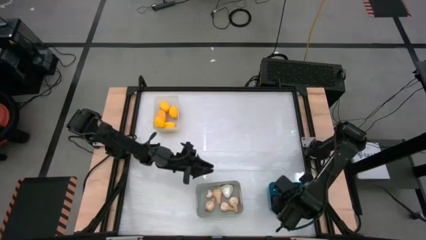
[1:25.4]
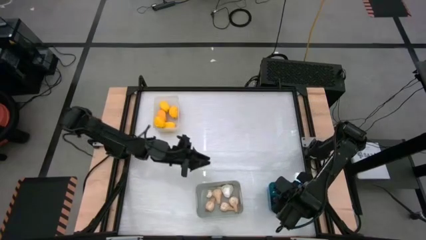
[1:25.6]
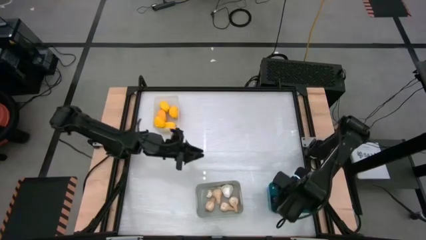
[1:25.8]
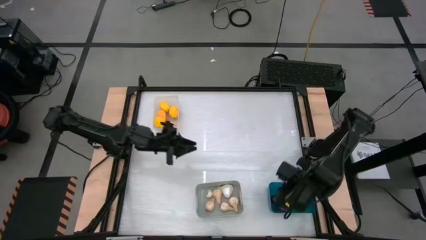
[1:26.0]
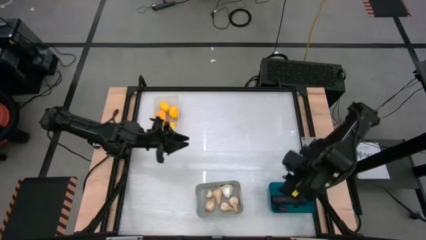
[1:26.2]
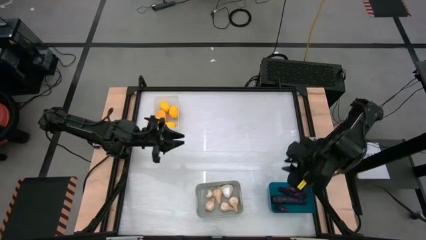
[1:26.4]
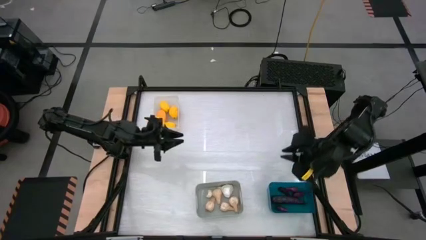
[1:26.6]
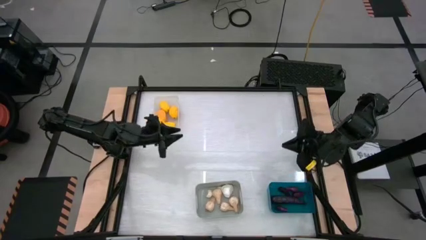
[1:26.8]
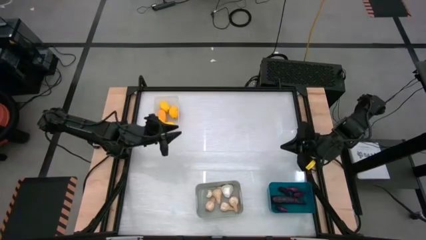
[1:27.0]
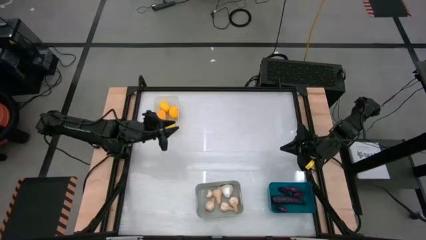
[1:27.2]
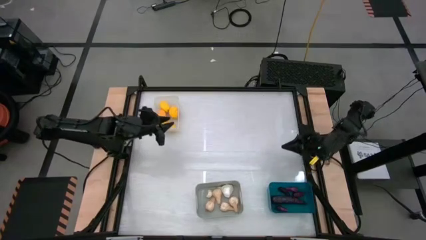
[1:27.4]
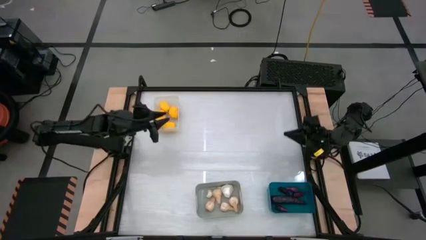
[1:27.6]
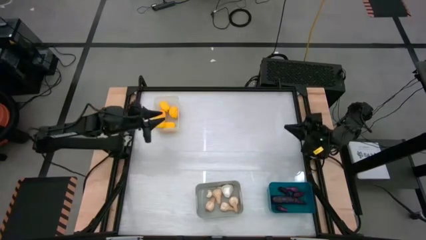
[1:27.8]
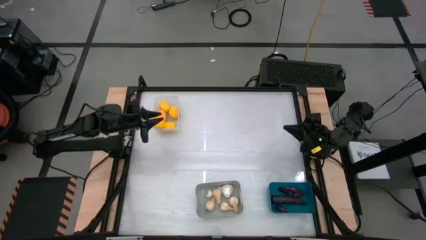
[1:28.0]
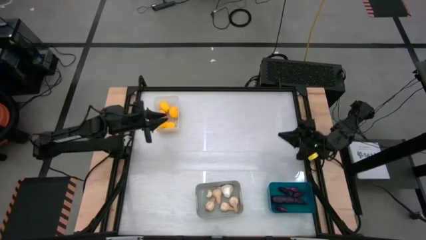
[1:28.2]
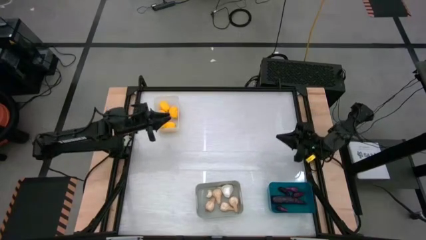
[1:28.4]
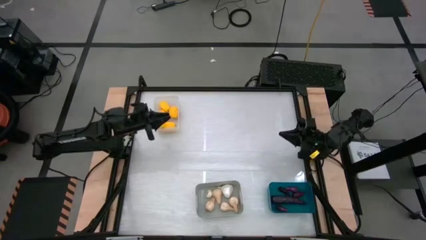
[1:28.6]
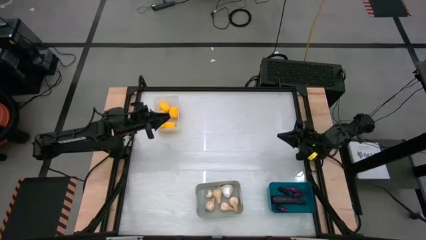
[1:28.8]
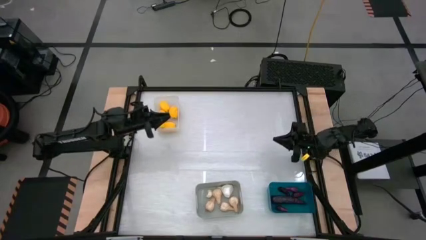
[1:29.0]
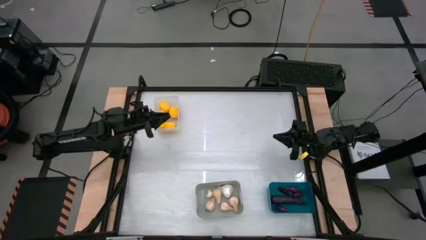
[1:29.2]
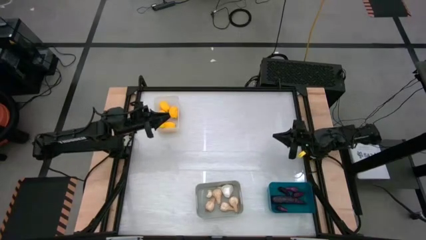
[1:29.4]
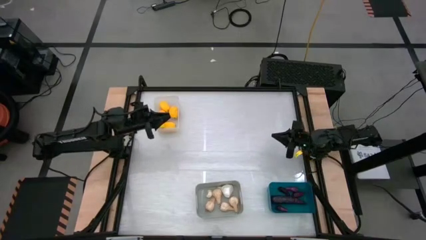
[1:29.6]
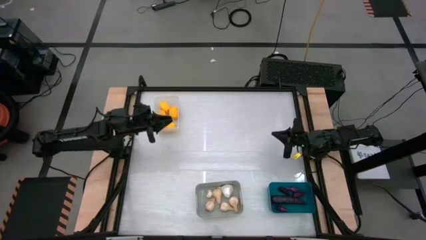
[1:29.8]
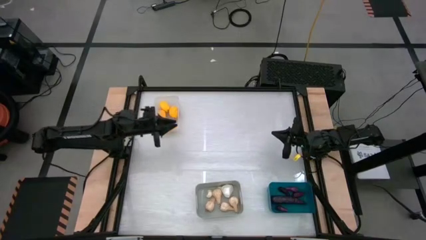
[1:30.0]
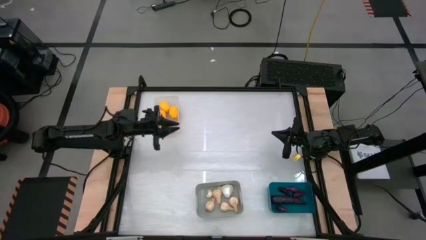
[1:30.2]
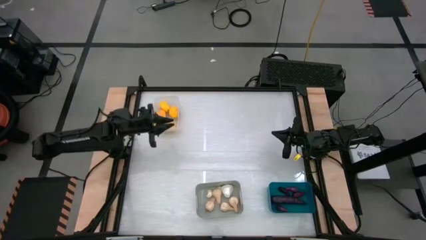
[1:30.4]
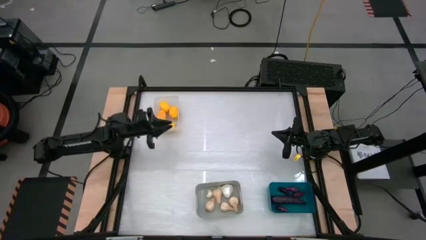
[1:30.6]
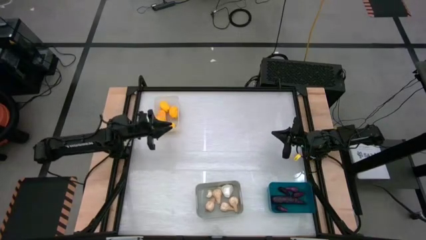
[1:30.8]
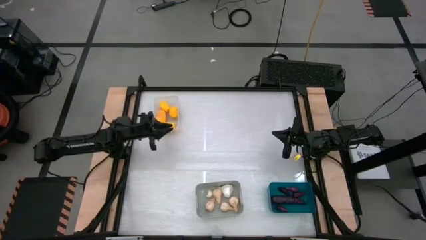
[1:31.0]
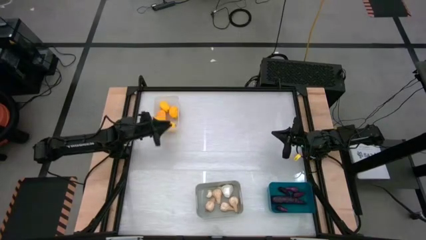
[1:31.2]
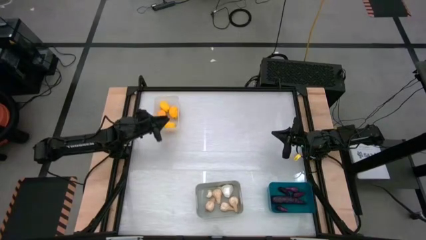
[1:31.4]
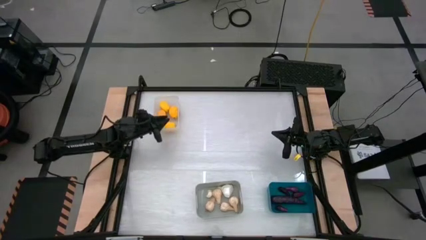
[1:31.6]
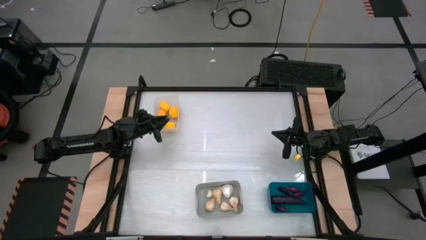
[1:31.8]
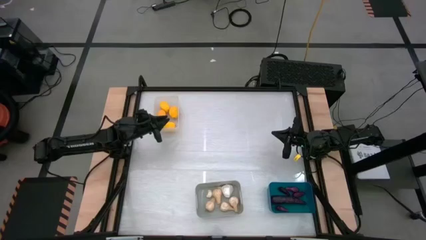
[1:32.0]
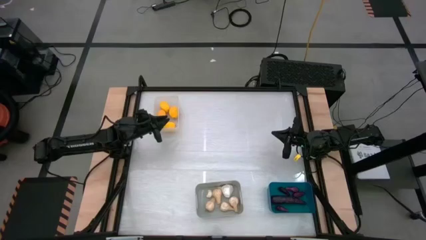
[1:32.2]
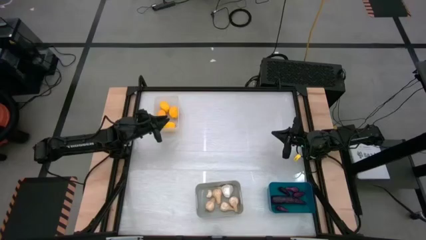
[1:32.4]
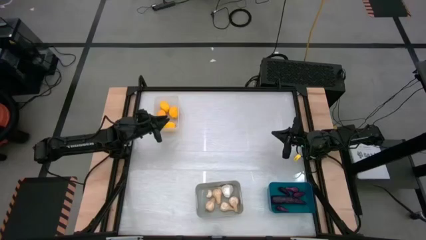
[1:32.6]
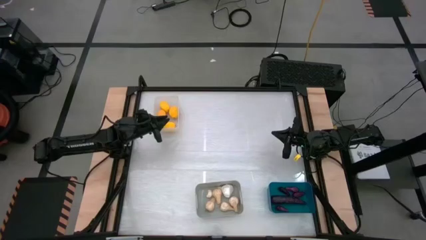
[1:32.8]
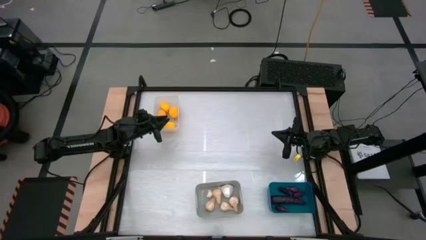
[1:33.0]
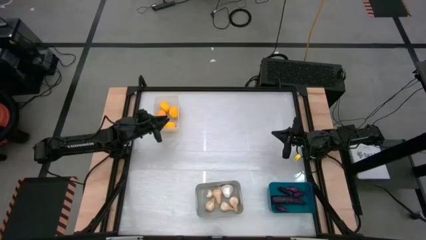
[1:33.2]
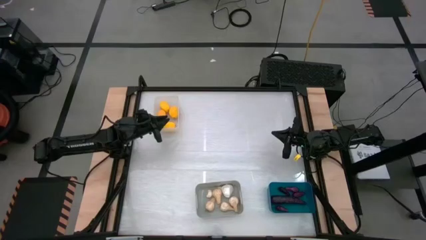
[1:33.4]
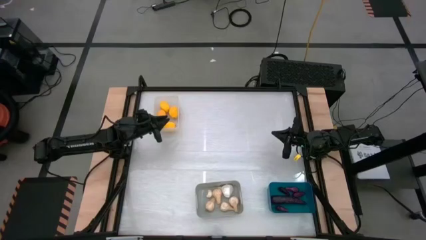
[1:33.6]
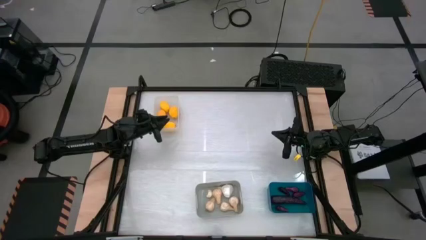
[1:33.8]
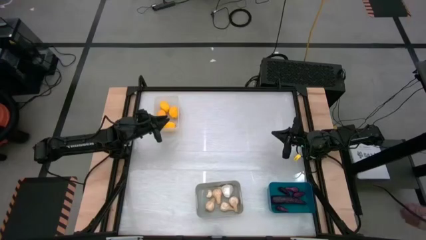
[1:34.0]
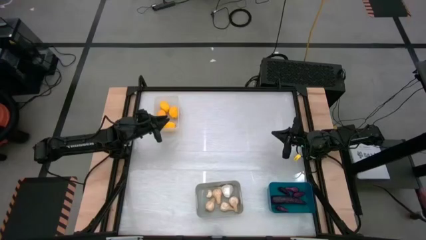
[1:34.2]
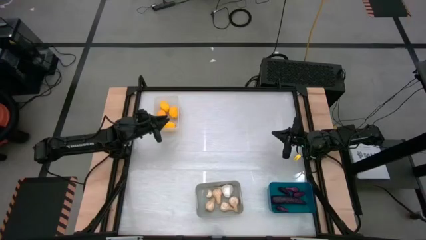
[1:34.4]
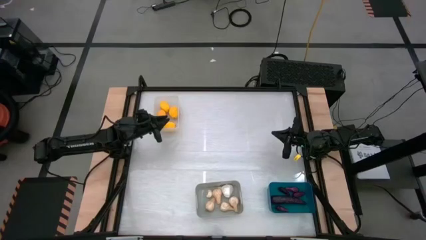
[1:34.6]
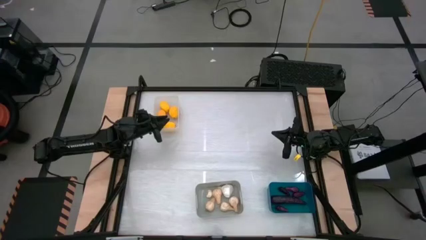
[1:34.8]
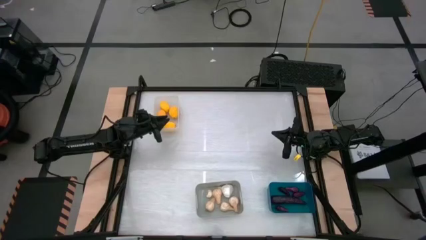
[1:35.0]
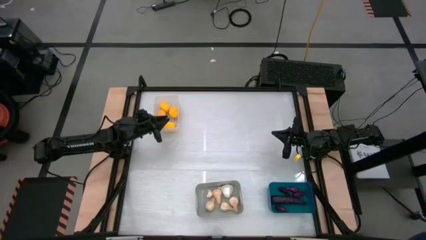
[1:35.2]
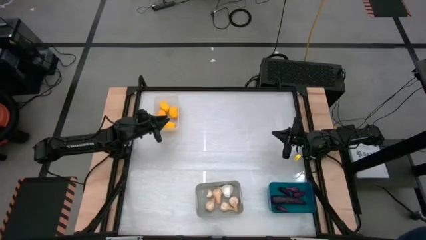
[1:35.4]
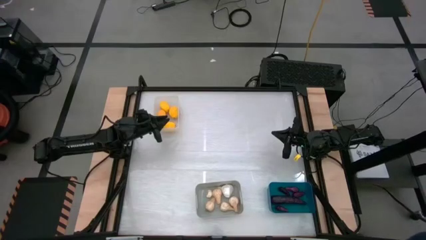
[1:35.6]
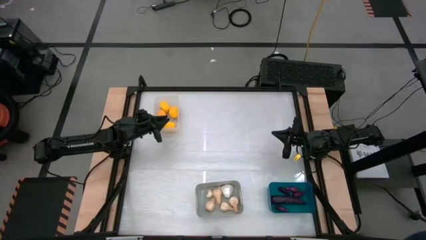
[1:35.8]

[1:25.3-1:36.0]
Task: Sort produce into baskets
Return to Home Position
